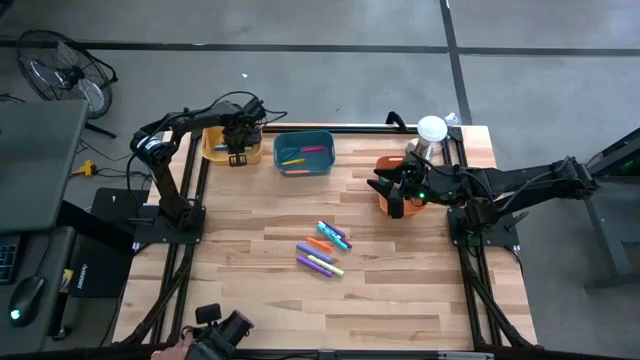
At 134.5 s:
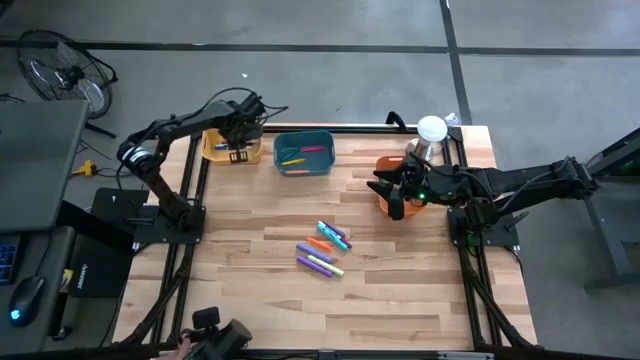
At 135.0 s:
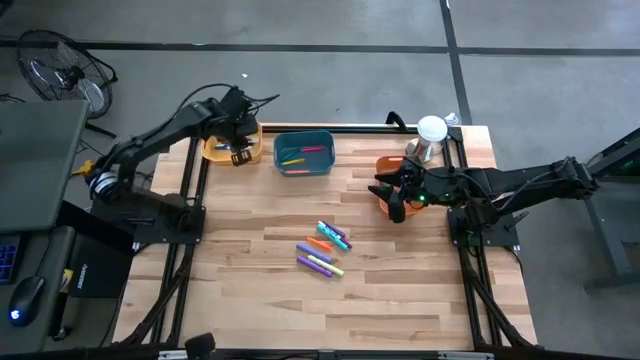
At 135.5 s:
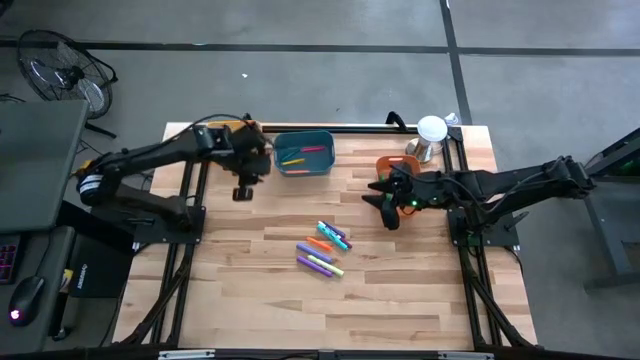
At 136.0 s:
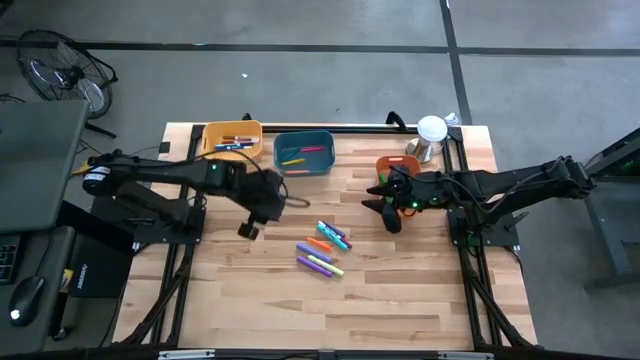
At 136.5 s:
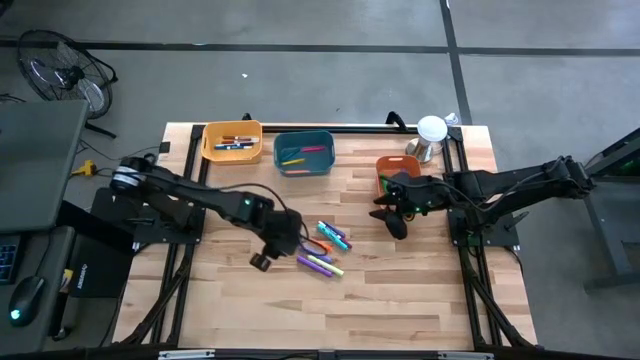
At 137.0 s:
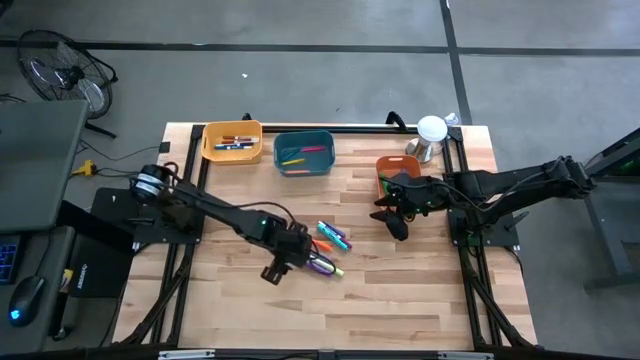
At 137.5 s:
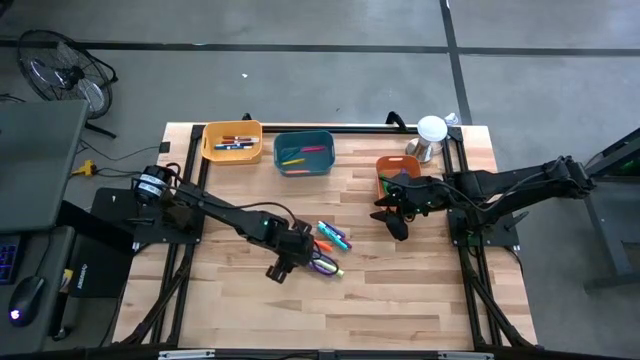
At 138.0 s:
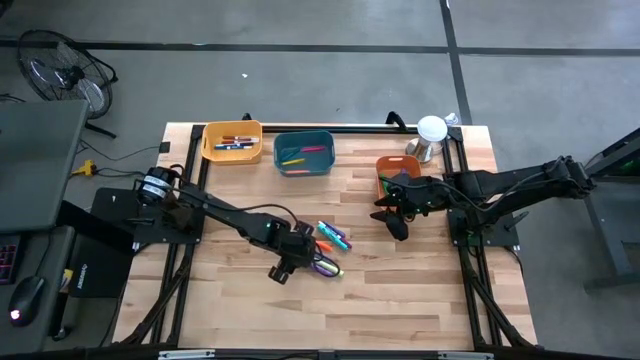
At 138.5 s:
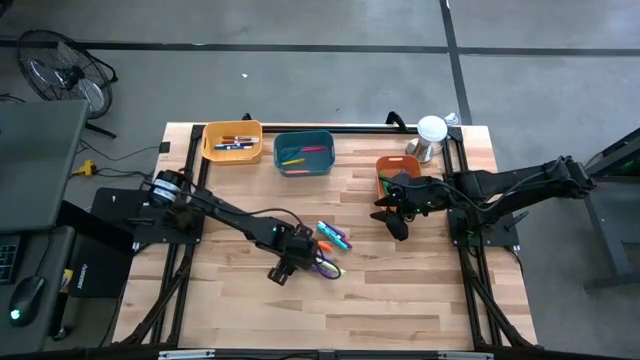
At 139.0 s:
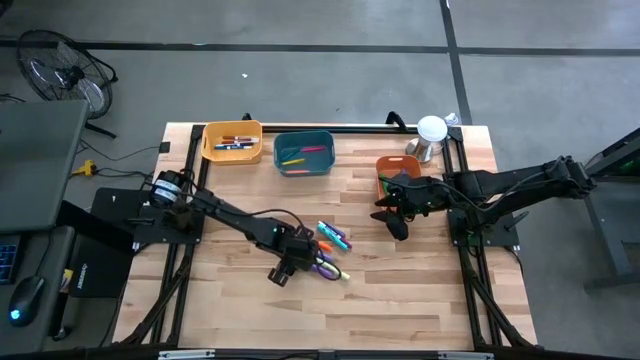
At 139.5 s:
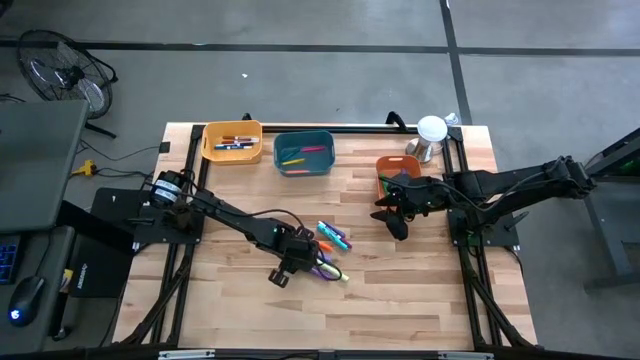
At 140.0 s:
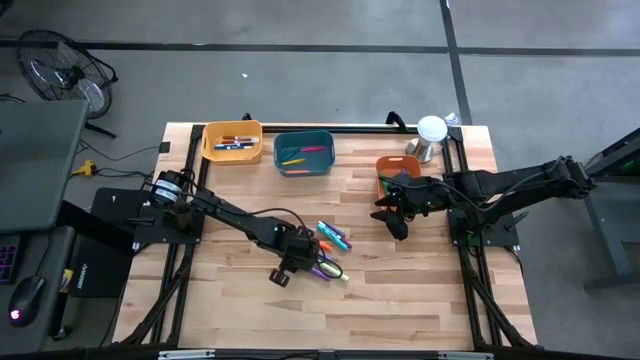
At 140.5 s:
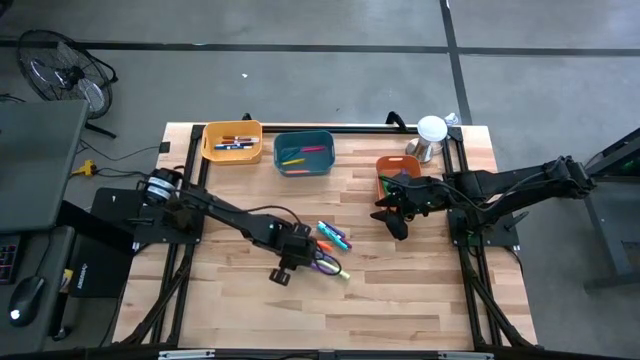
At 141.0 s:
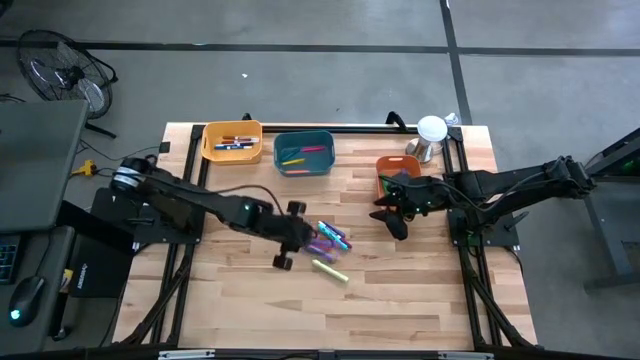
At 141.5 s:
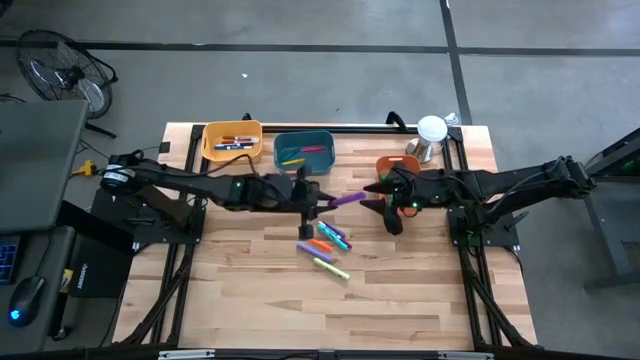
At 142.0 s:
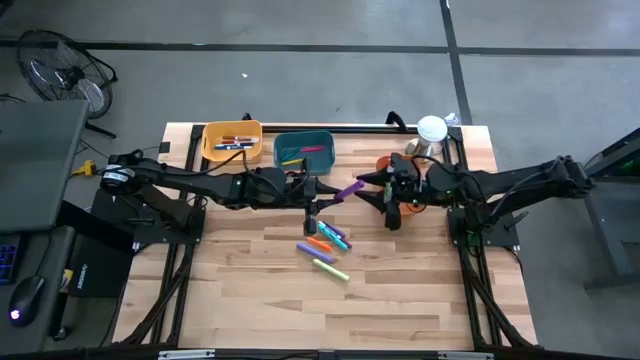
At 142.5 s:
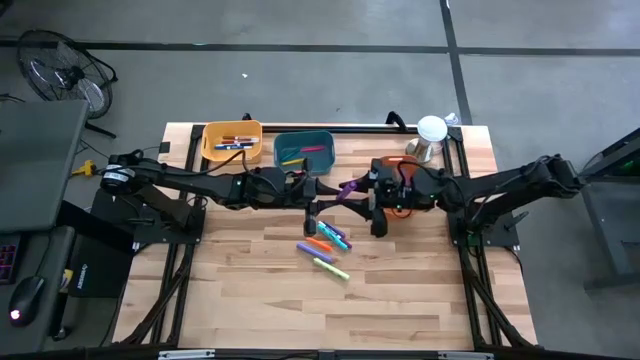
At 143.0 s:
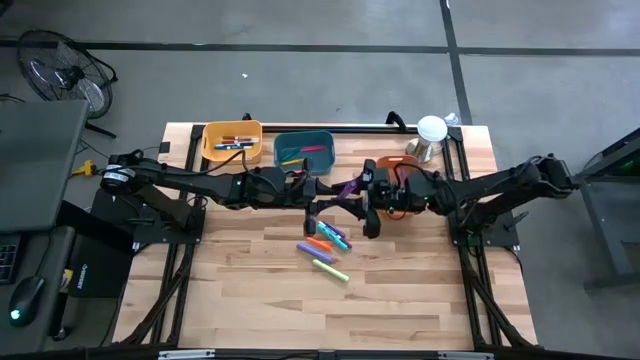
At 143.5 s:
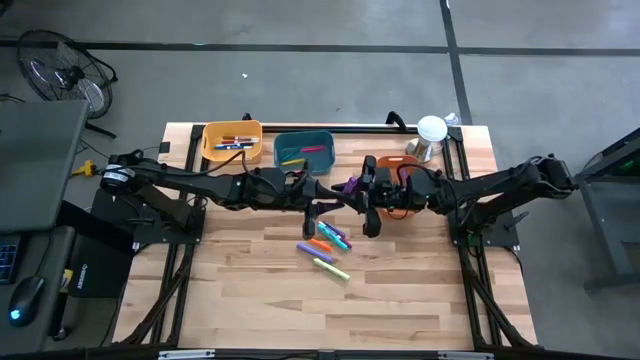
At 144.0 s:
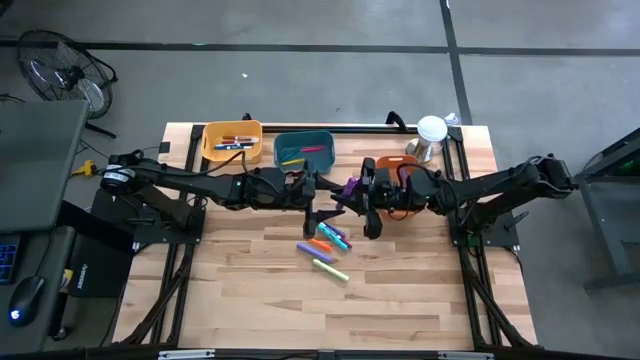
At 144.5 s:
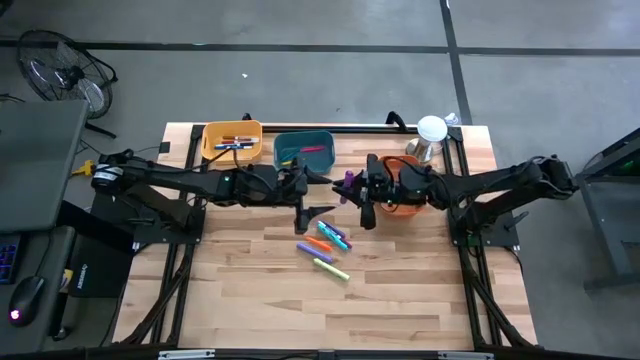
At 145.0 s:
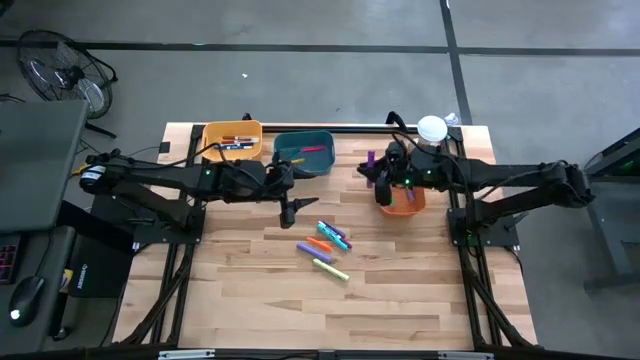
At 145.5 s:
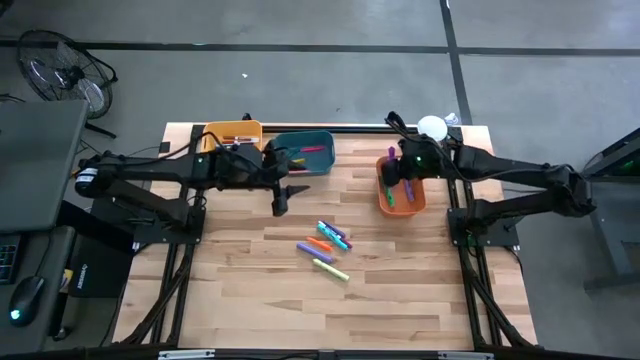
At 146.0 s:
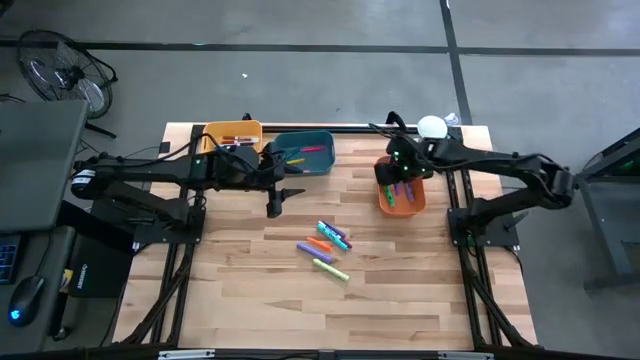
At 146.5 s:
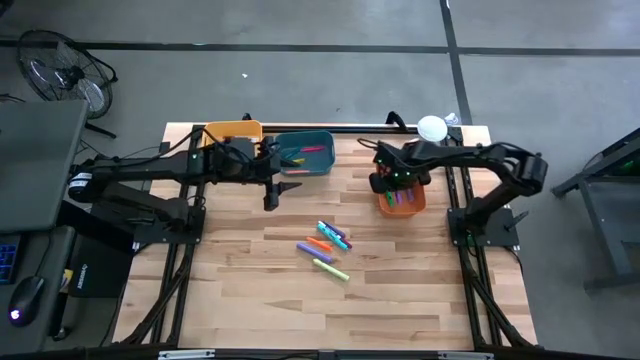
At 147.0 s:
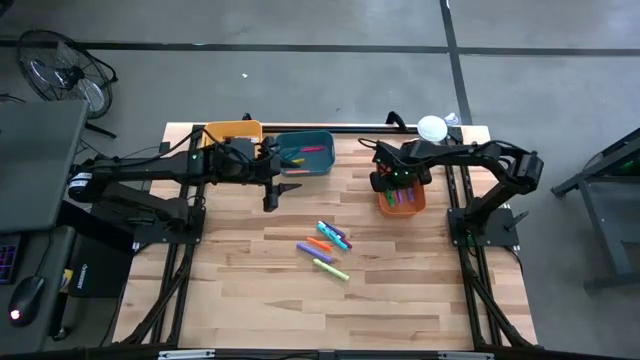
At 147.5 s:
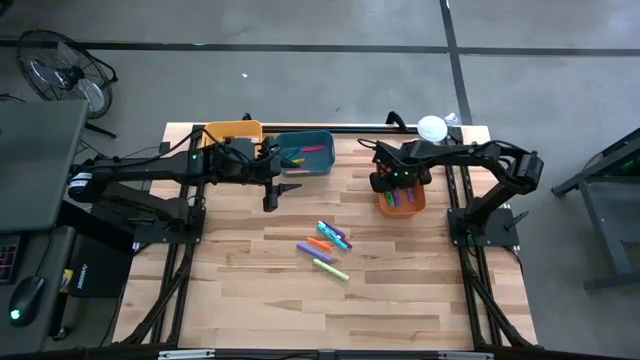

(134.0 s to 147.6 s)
Task: Pick & Place Markers
Put the dark purple highlighter pen into the orange bin

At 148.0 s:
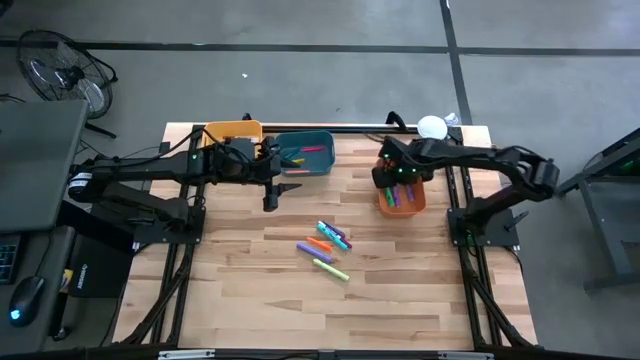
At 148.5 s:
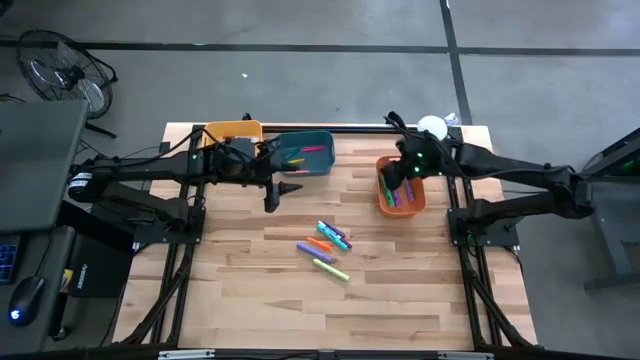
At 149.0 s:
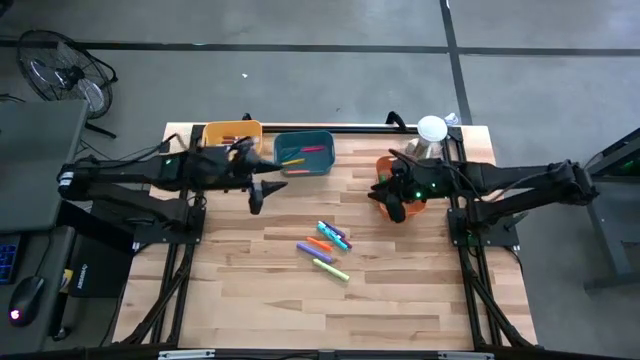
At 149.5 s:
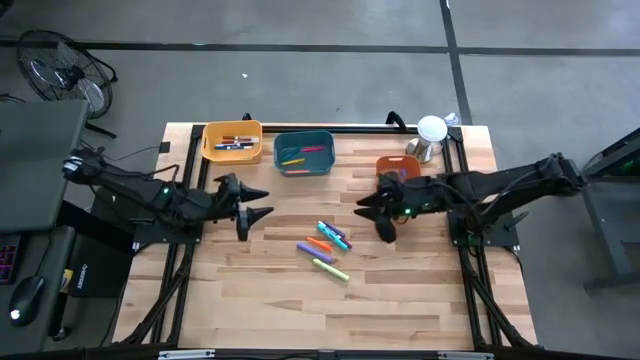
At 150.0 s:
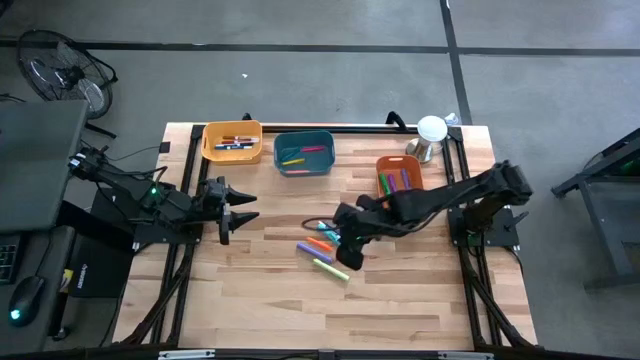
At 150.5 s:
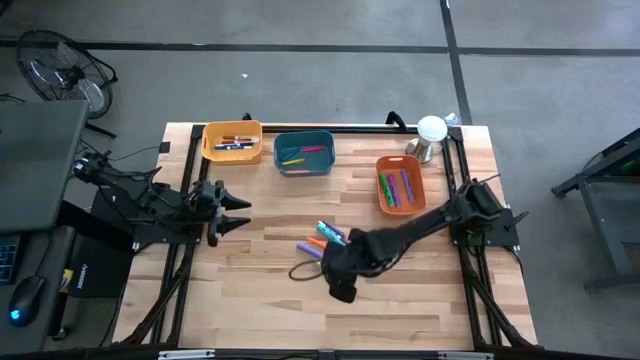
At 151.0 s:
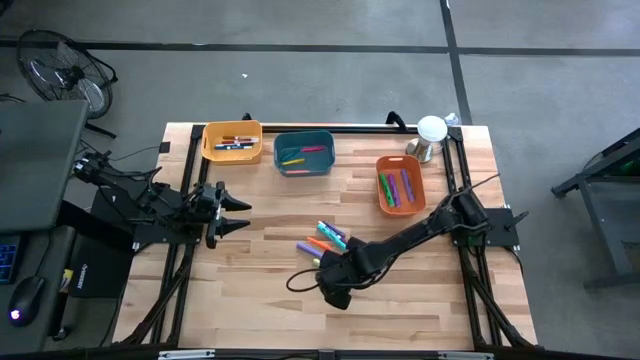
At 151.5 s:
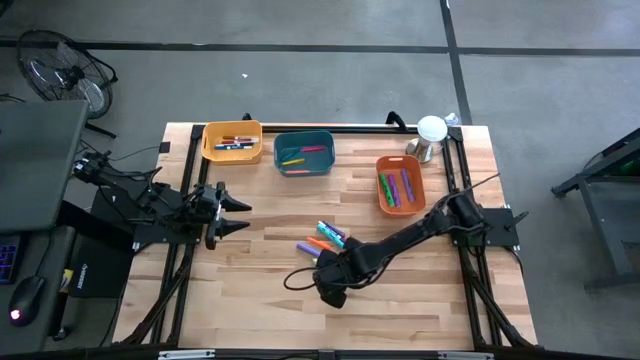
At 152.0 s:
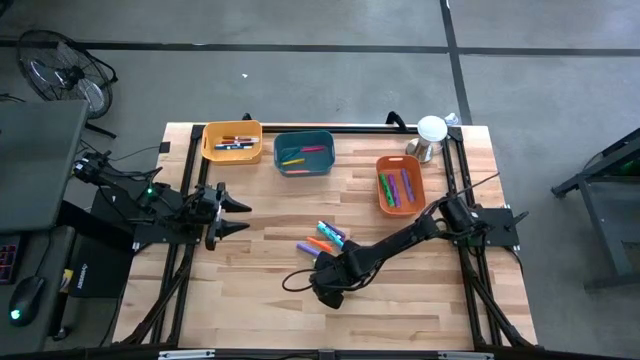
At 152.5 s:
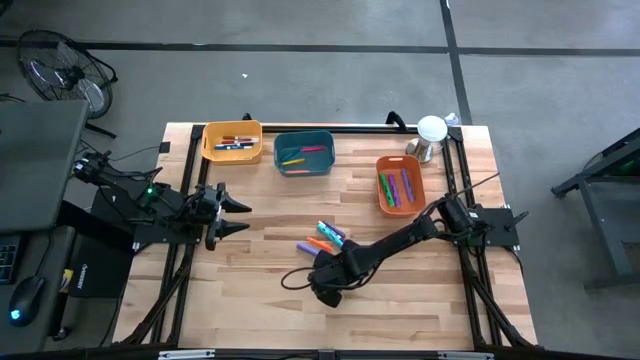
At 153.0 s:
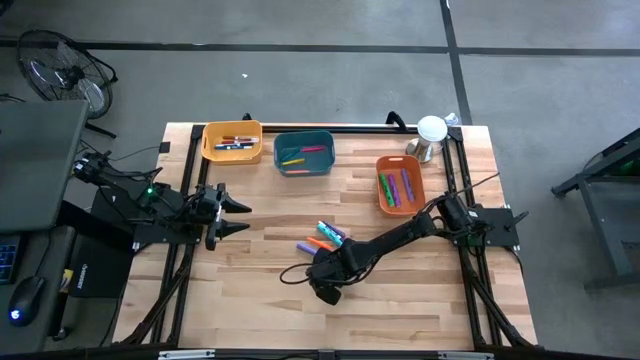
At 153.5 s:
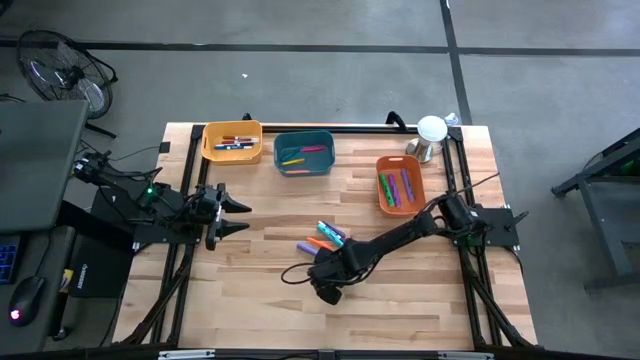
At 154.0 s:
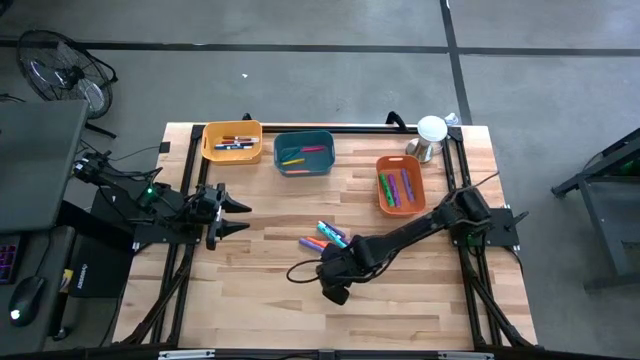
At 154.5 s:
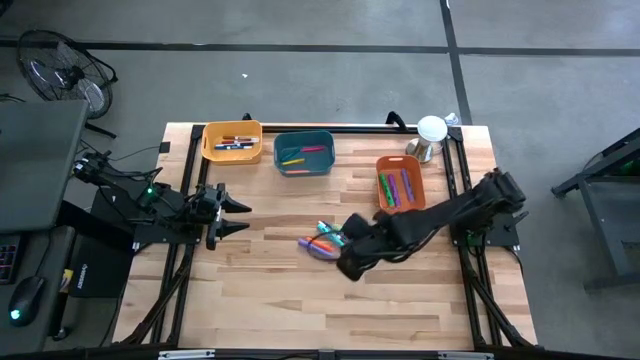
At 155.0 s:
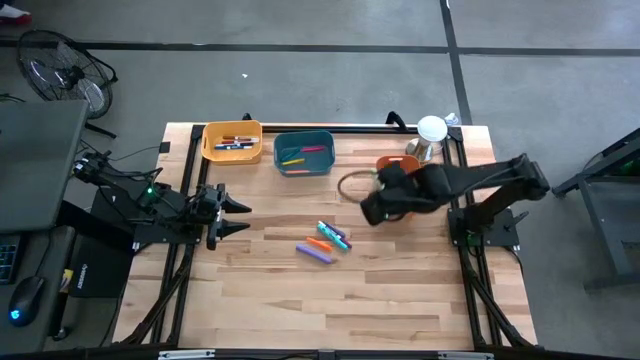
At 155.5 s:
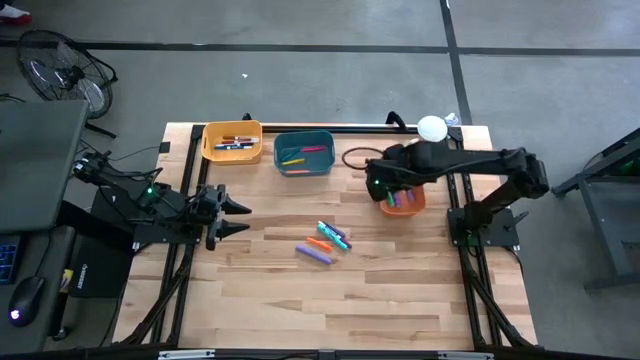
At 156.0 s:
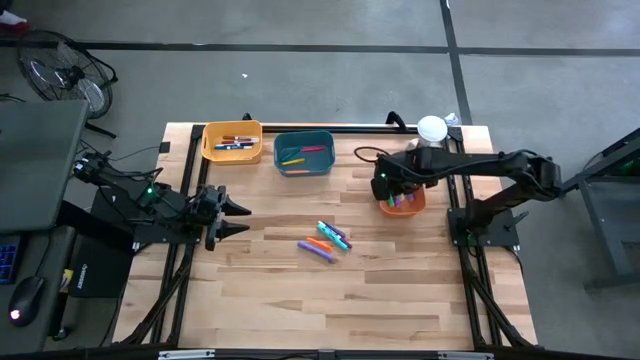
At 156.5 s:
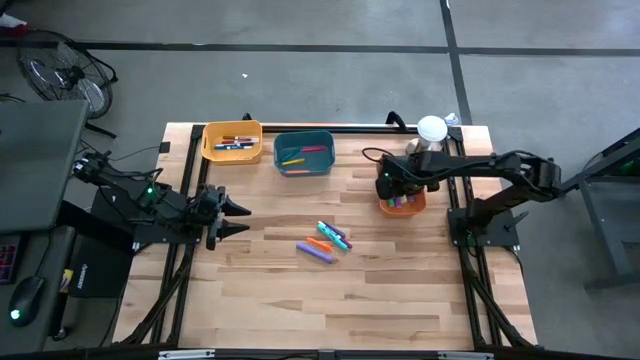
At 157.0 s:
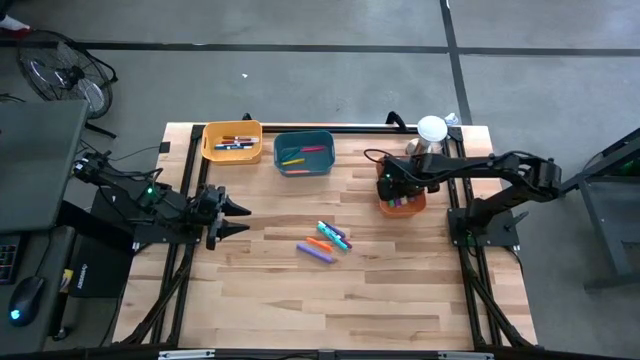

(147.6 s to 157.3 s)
Put the light green highlighter pen into the orange bin
